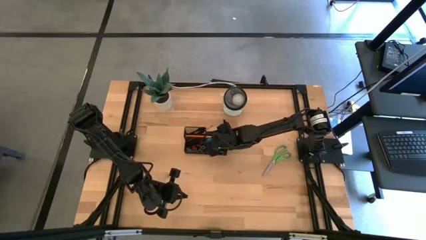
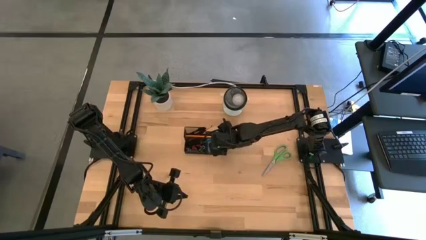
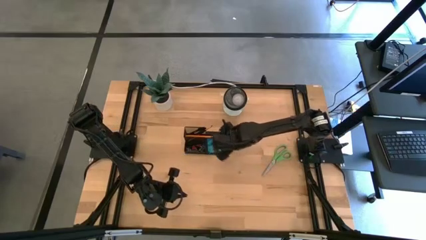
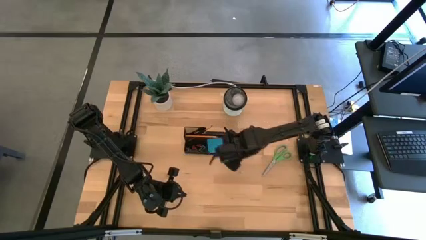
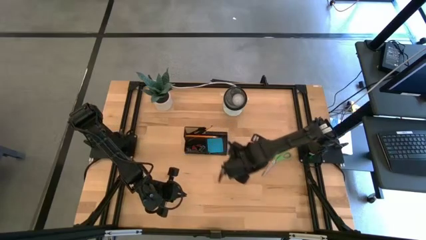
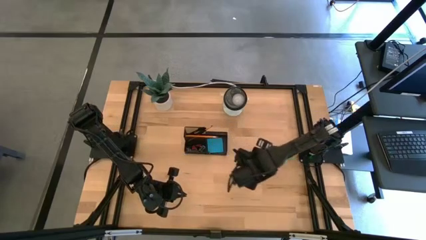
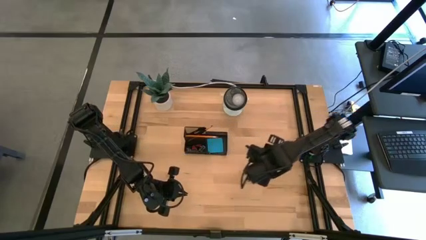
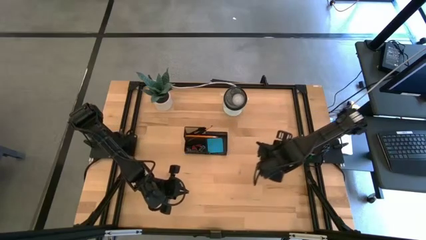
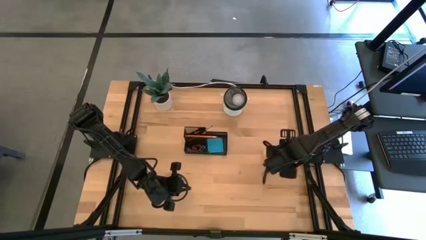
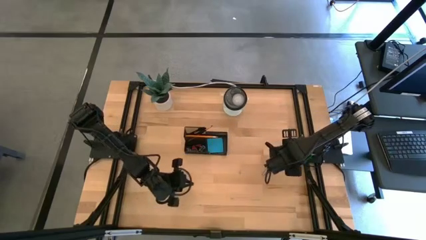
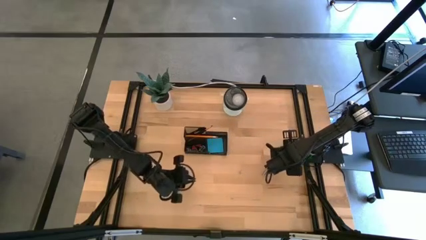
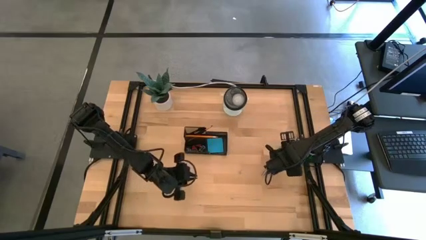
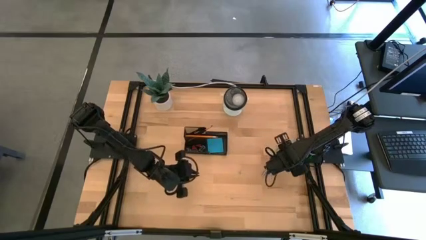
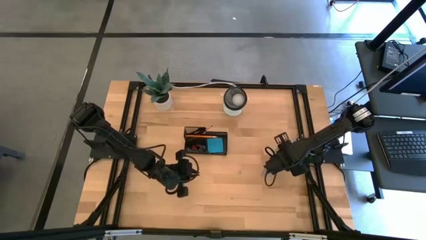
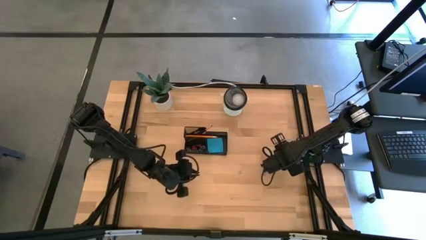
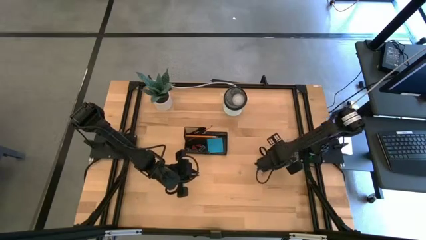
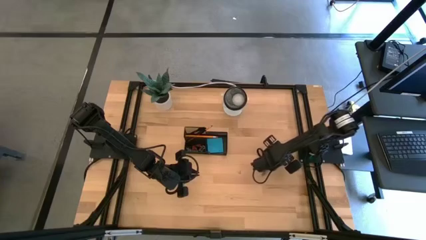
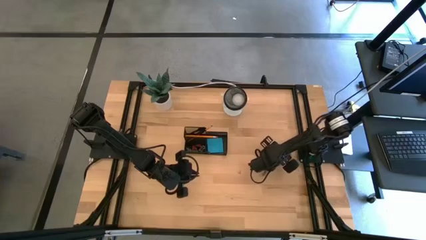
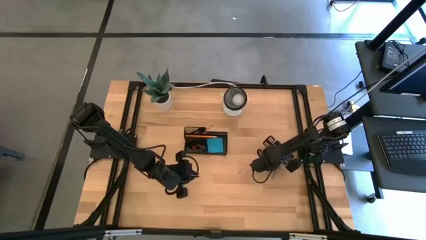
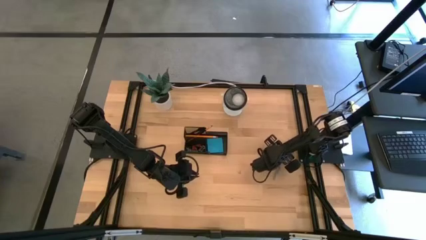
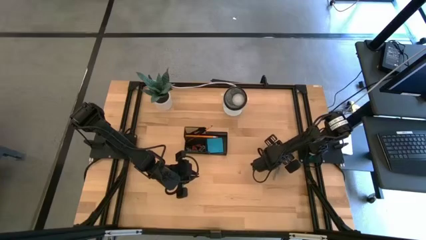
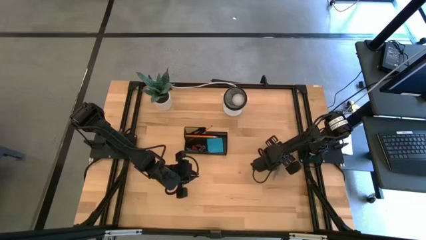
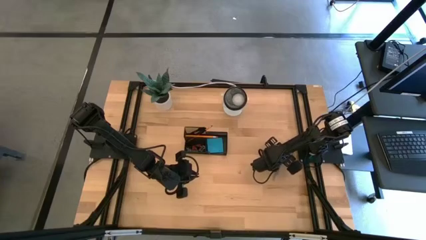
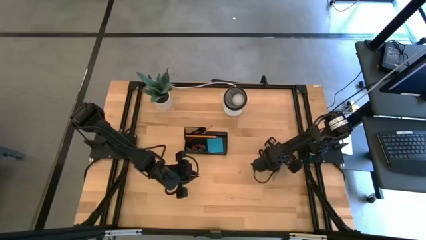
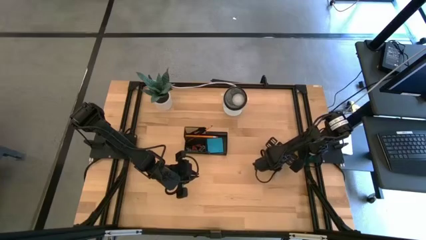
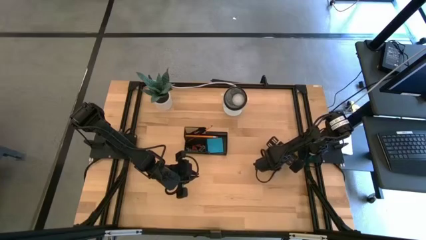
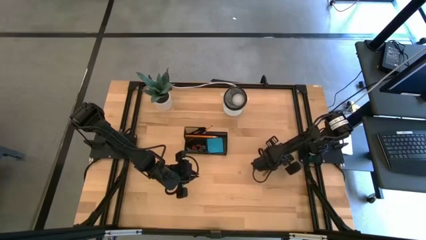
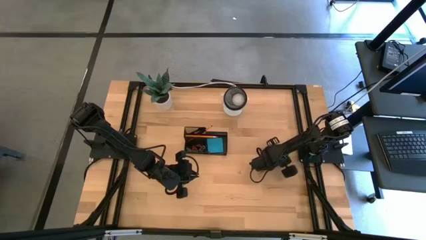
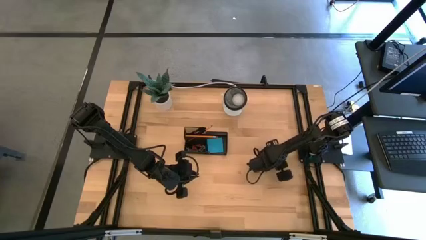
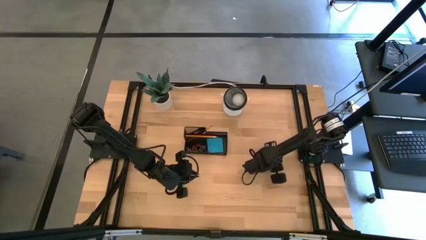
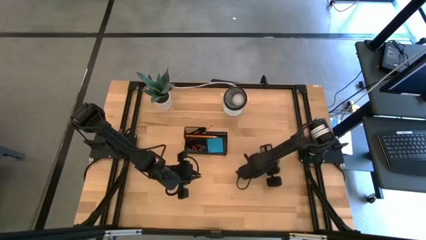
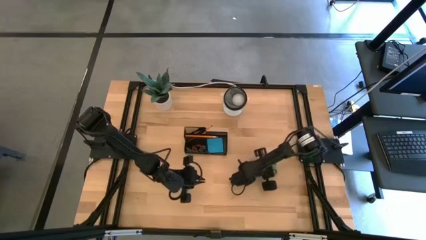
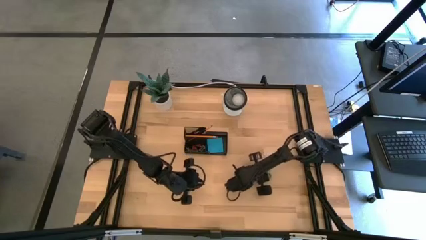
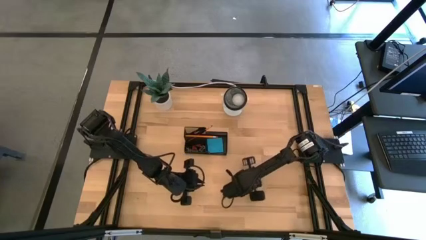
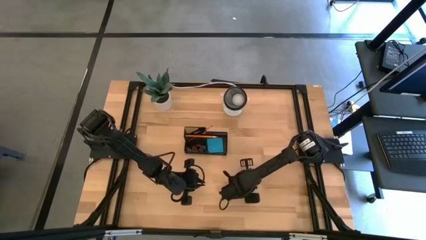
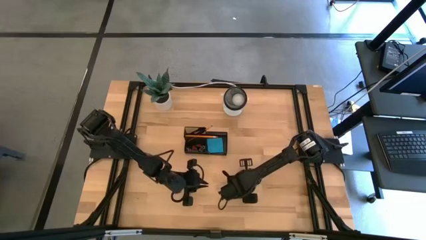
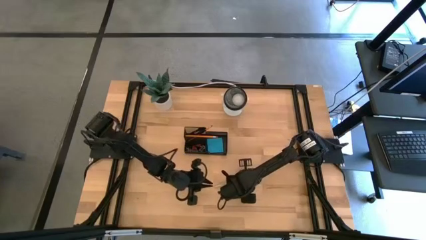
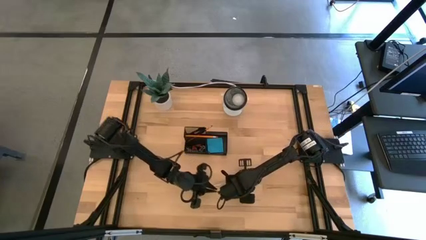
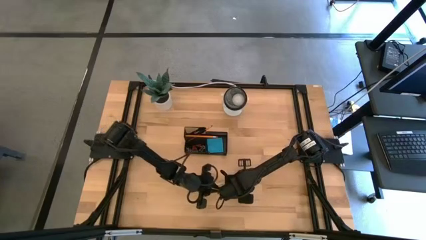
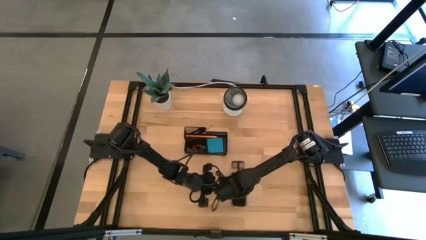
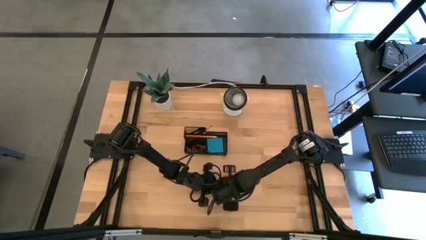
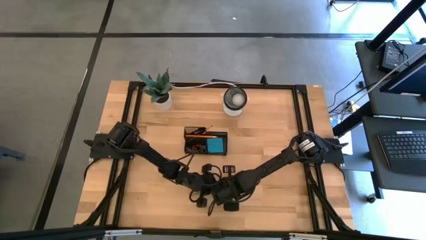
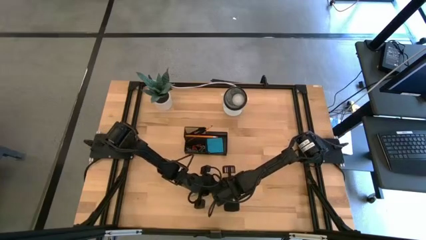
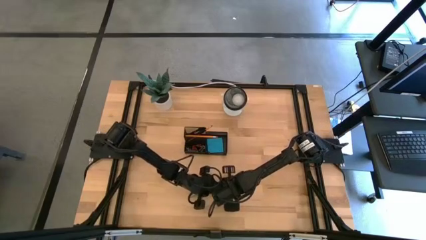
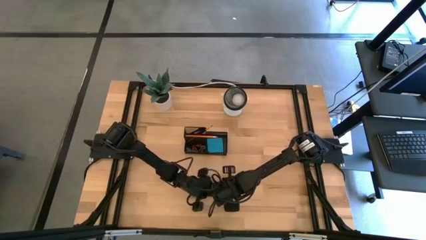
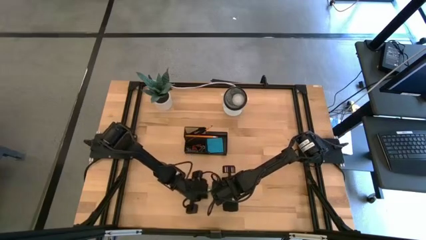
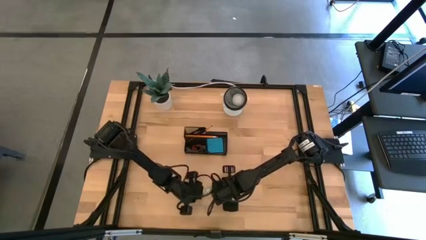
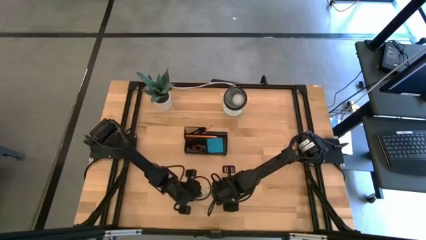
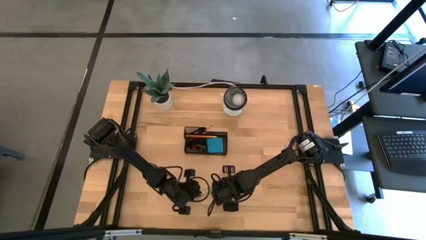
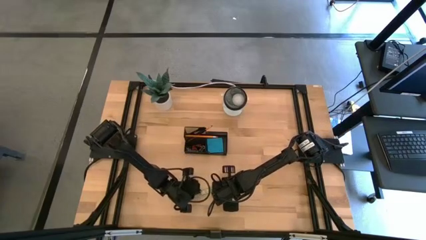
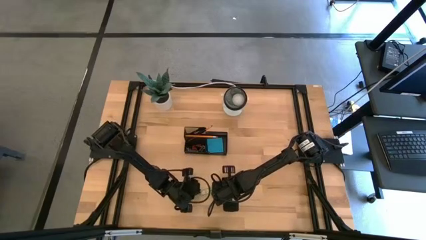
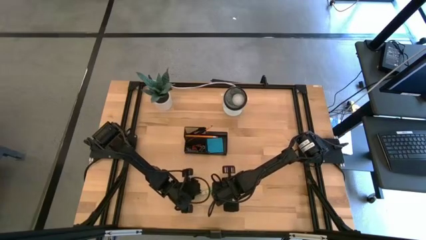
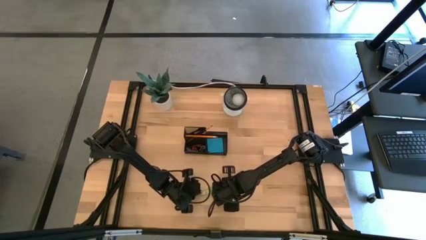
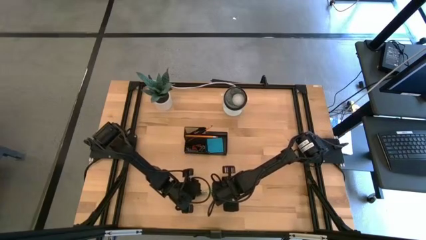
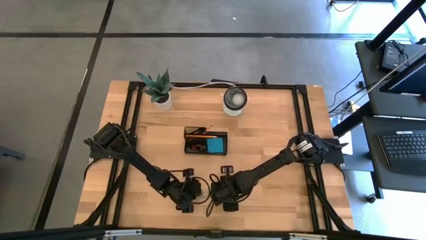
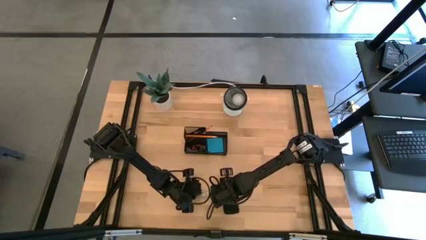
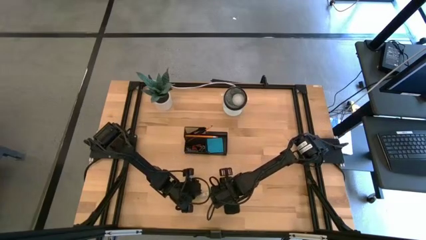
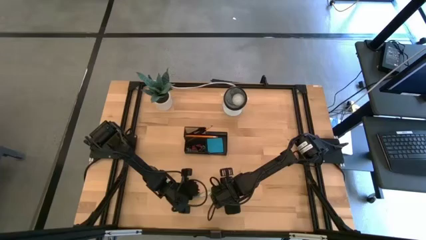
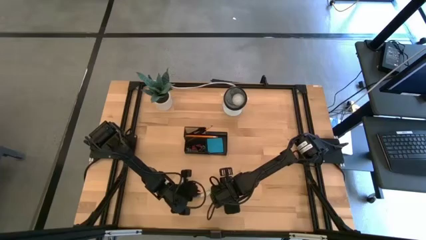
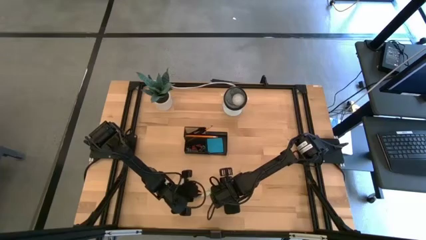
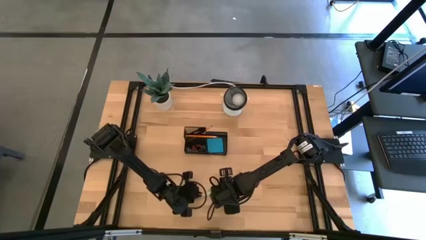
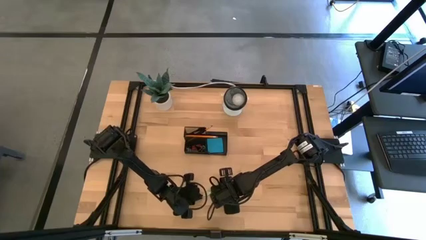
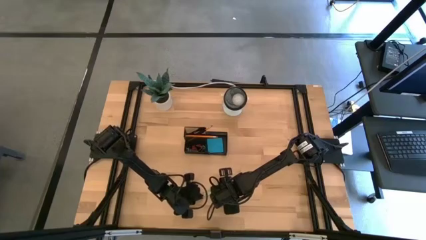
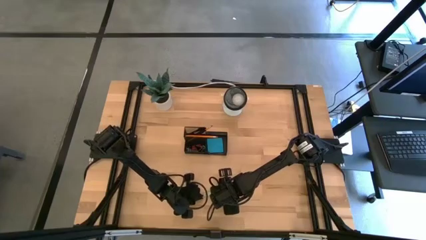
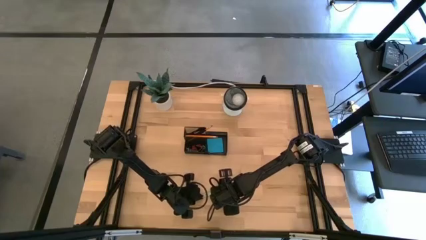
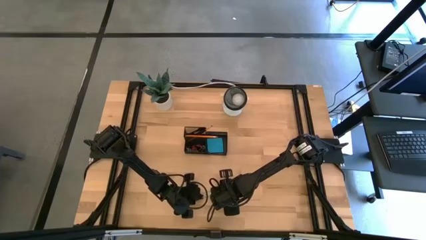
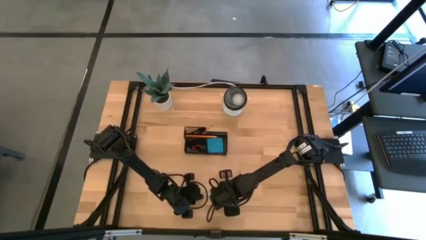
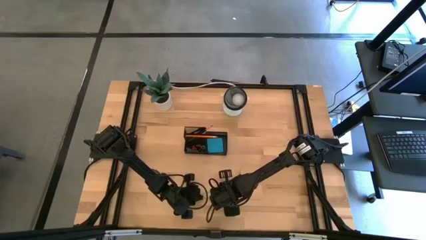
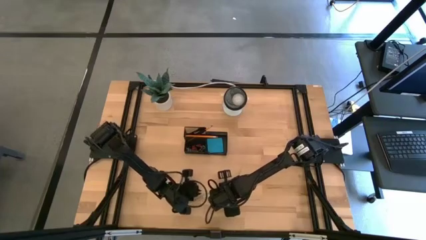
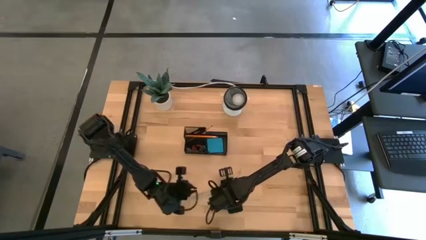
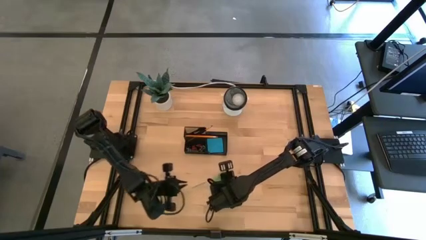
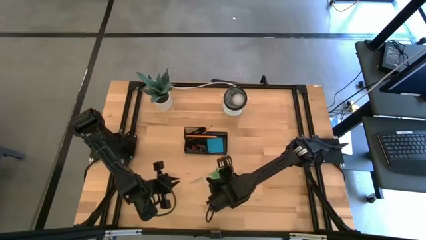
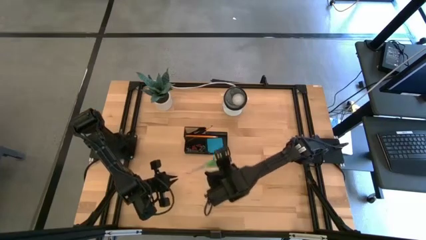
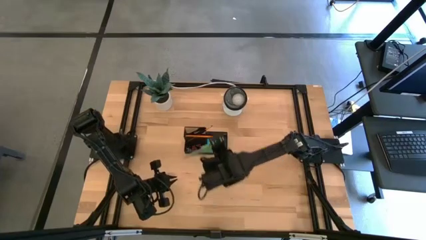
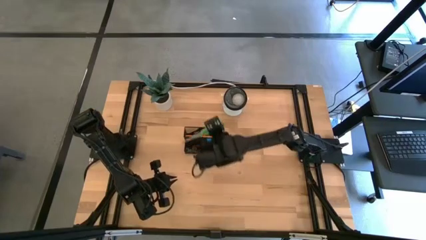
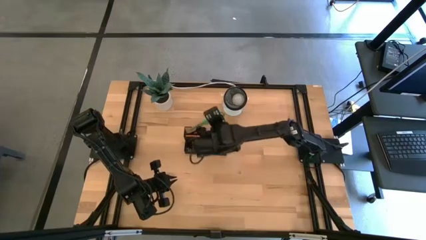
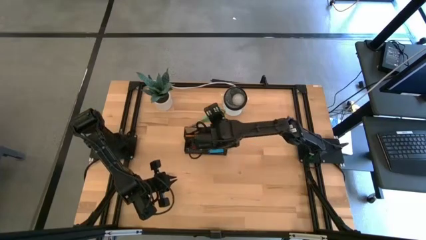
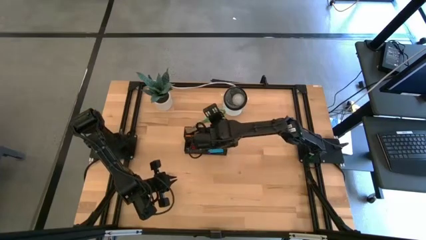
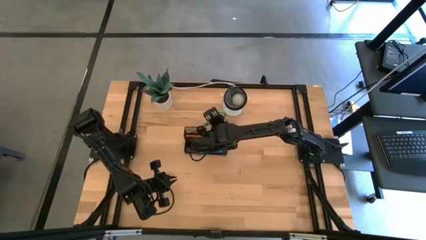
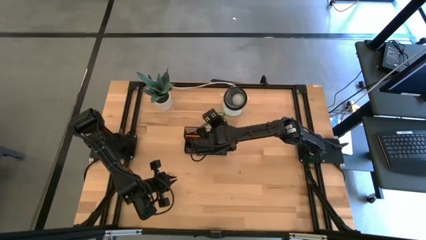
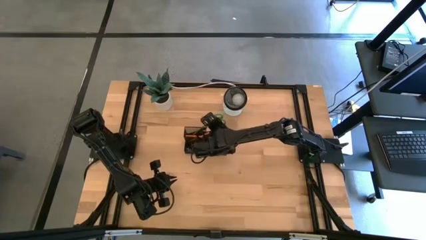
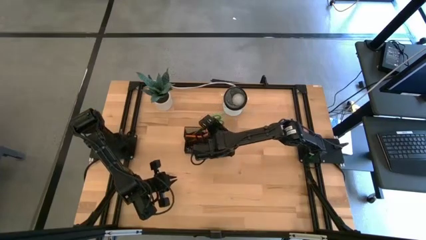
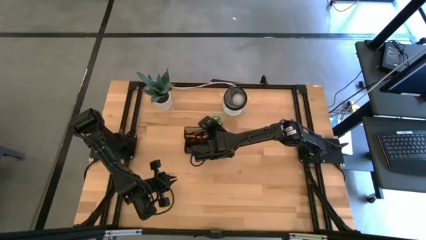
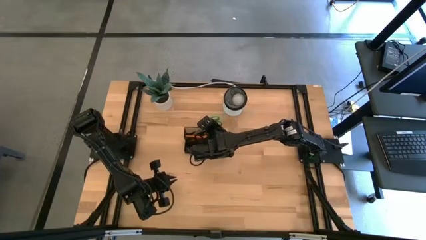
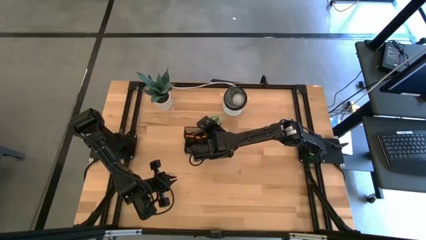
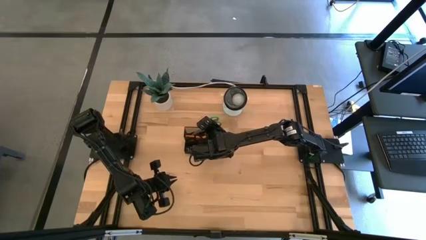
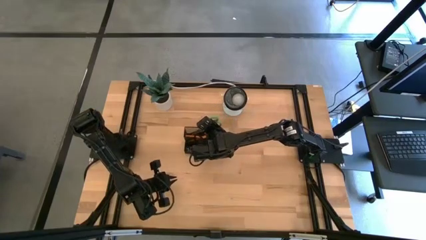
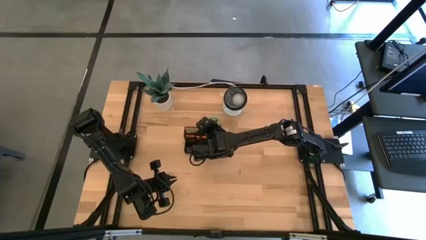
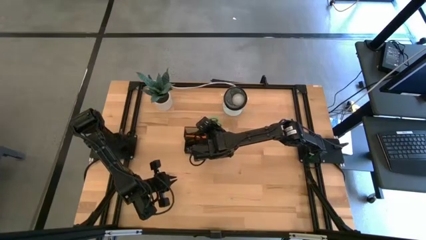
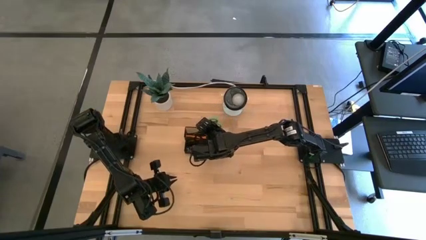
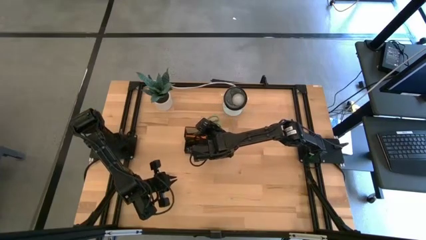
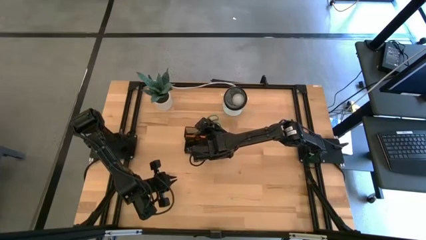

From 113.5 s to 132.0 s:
Task: Pick and place office supplies into organizer
Put the green scissor in the desk organizer
